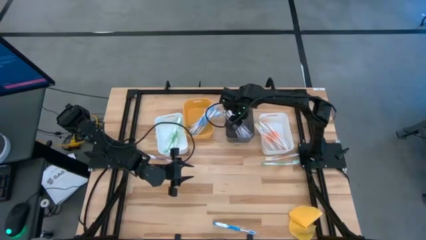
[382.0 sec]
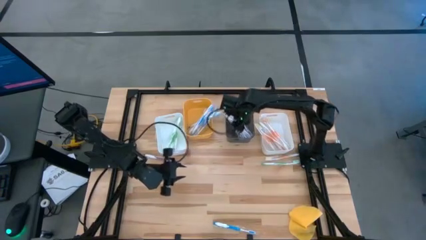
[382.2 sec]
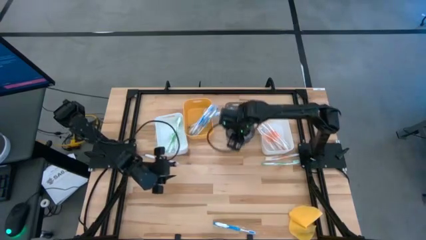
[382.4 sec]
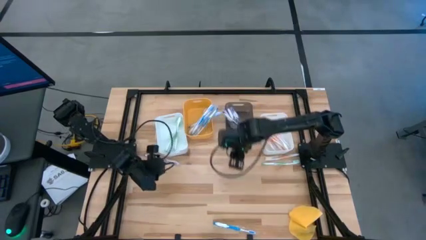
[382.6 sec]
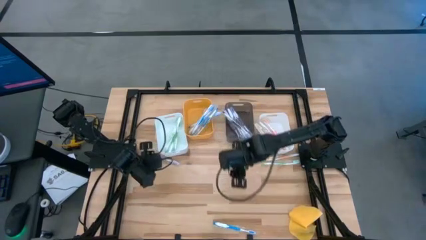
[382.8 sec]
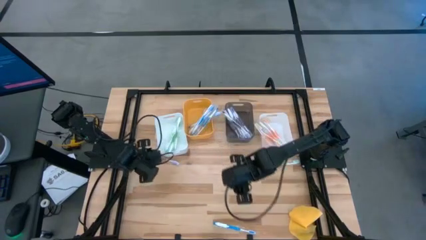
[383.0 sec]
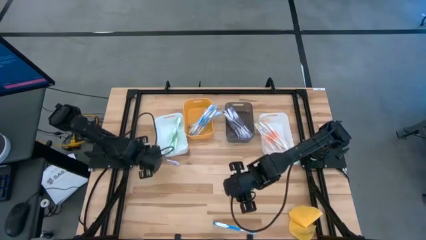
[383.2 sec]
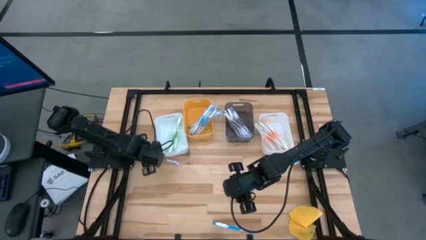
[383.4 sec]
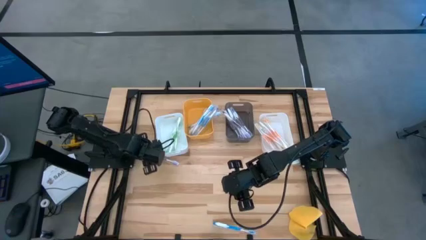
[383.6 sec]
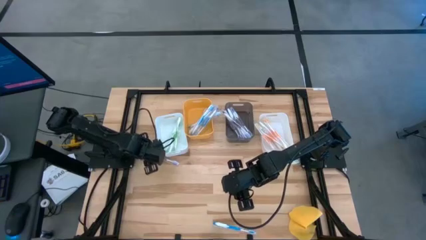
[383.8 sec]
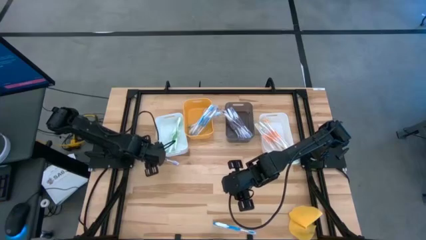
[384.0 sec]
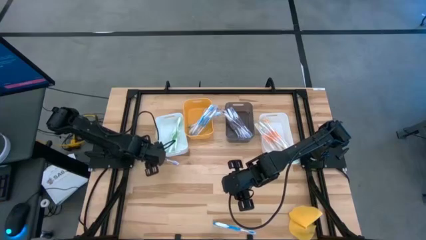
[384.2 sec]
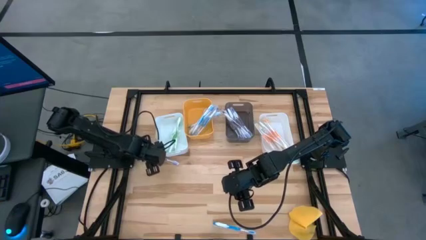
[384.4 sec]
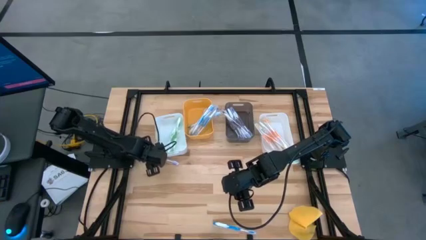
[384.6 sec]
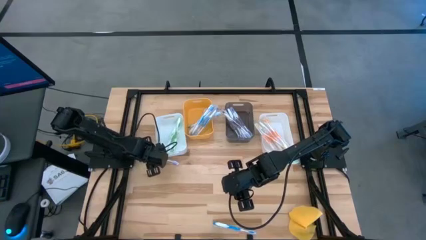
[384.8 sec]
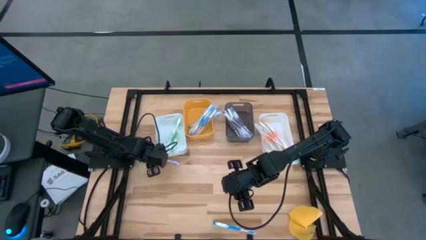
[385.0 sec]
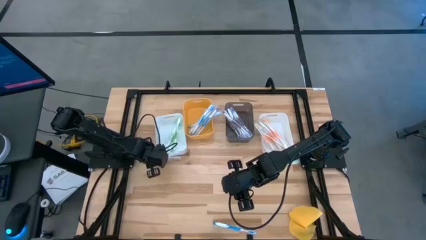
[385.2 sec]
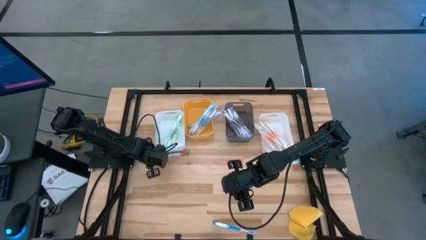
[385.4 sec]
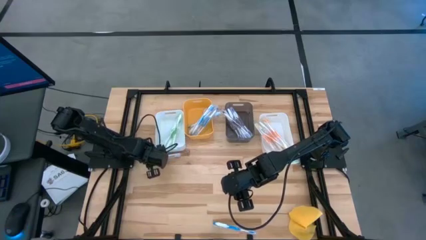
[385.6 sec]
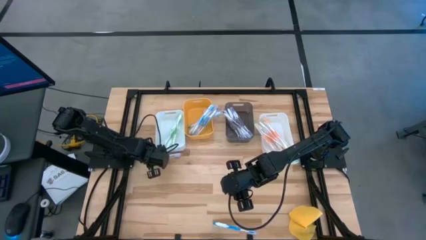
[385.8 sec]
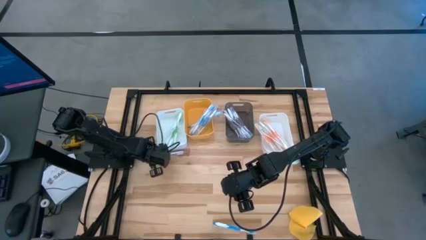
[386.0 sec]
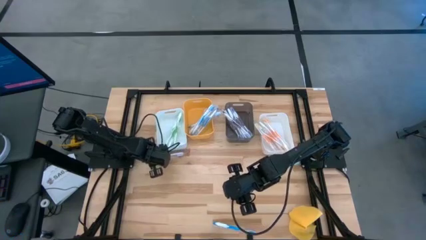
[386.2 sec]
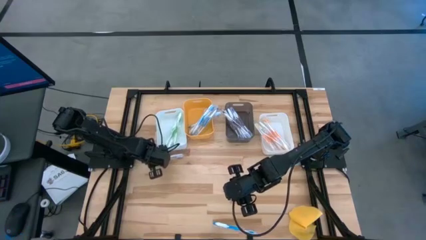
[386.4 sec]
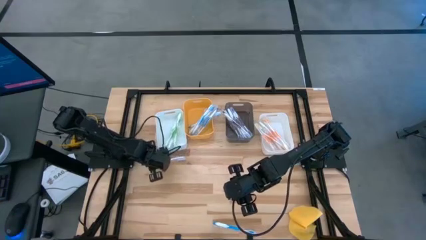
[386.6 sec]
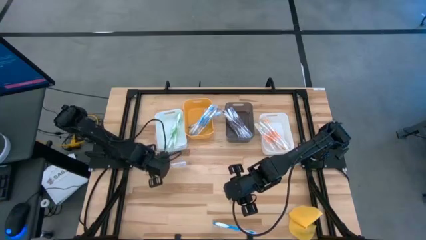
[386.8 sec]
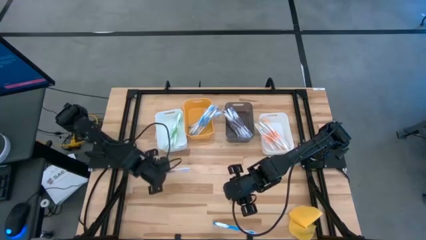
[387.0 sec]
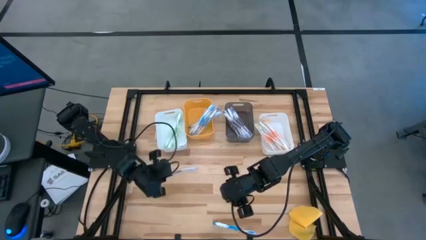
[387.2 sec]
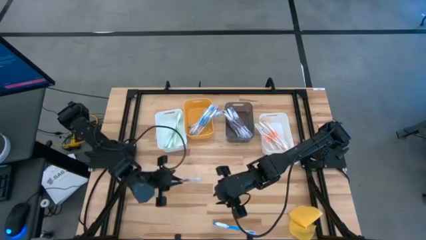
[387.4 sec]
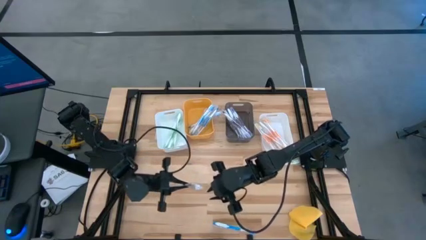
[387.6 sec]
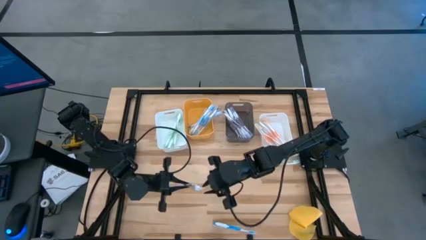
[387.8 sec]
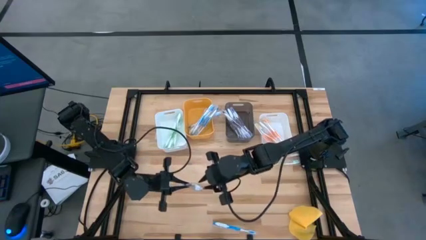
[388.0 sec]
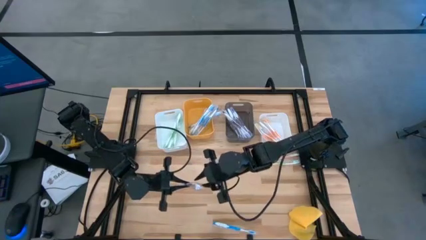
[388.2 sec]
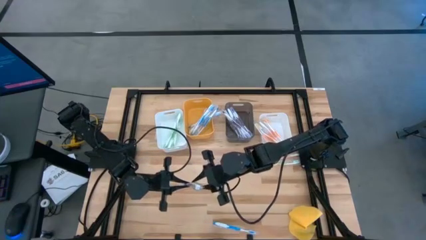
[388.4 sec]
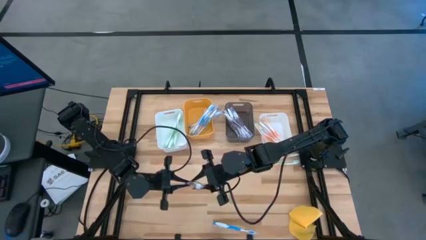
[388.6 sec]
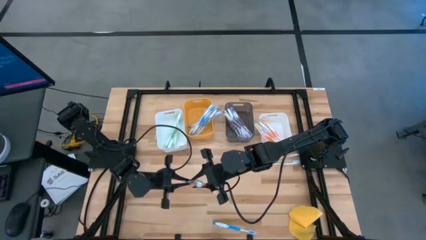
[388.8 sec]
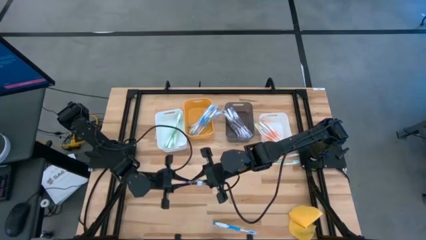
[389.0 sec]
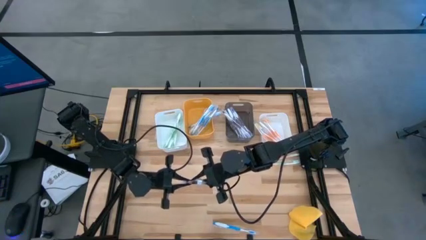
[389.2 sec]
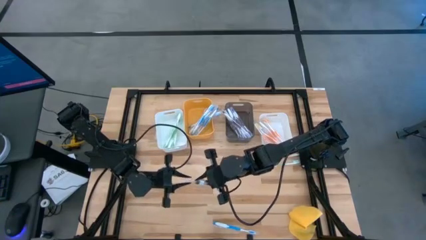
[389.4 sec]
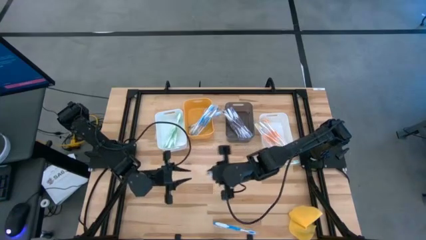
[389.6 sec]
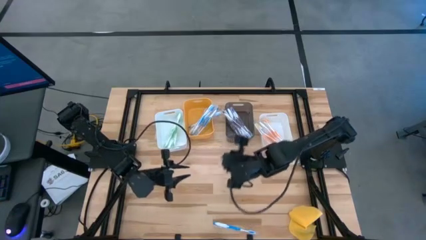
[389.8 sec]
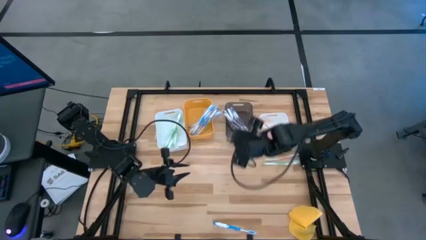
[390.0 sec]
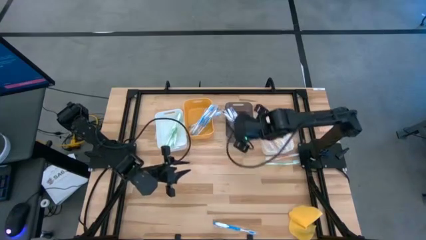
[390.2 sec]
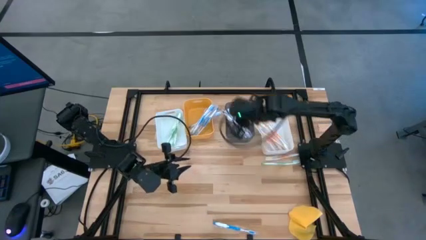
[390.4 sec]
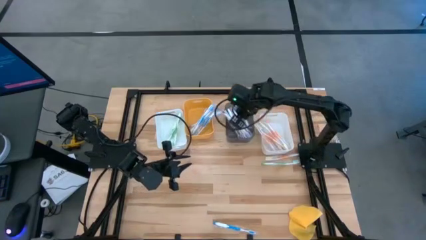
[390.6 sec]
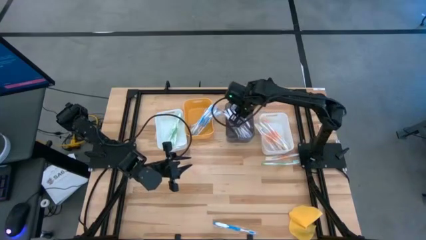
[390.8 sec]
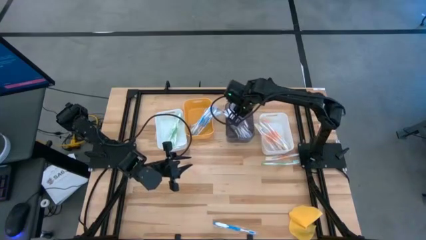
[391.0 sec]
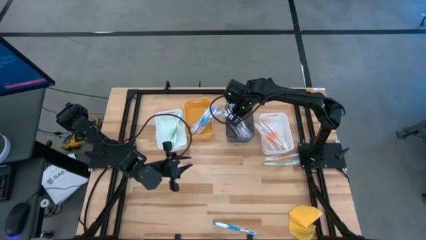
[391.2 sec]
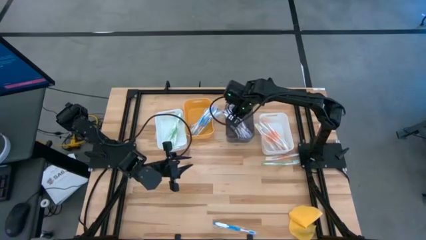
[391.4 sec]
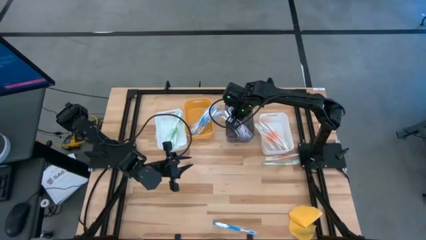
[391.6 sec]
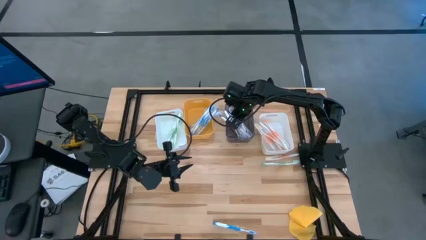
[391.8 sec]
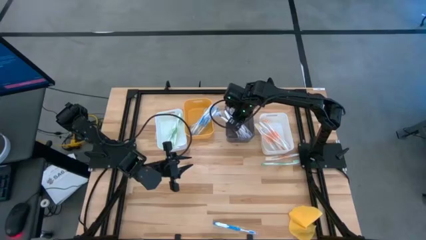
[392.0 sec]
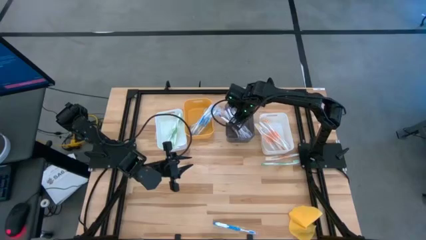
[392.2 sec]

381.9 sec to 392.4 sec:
Task: Pick & Place Toothbrushes
Put the purple toothbrush into the black transparent bin

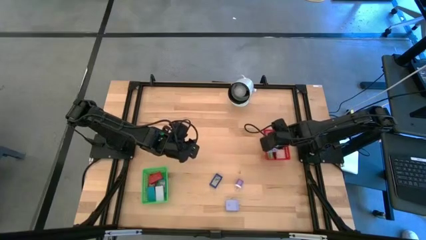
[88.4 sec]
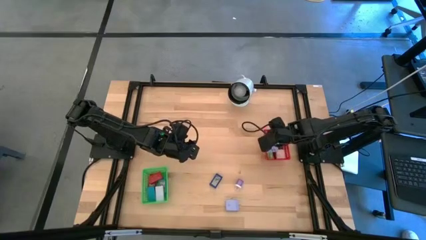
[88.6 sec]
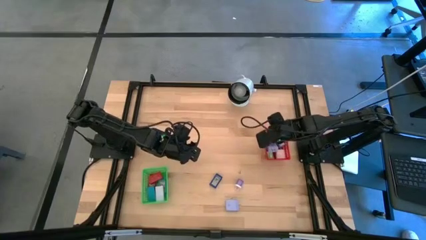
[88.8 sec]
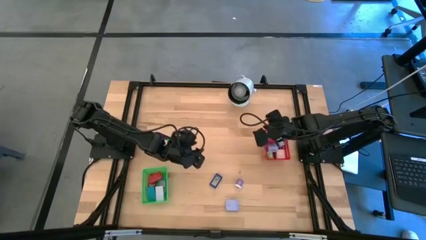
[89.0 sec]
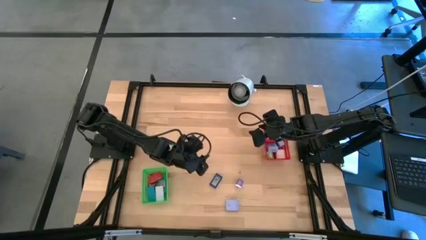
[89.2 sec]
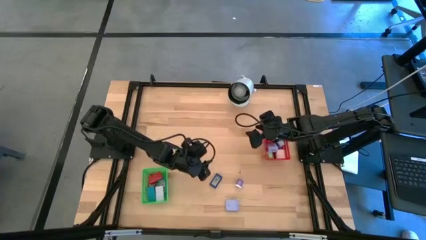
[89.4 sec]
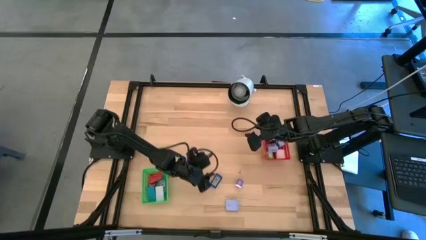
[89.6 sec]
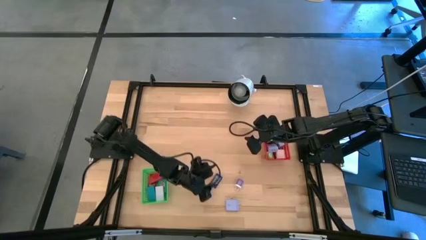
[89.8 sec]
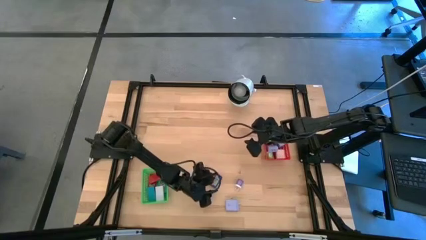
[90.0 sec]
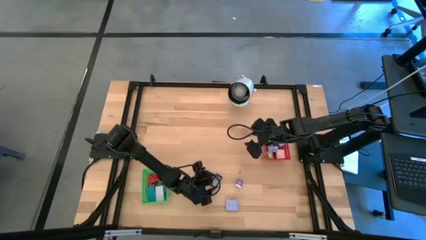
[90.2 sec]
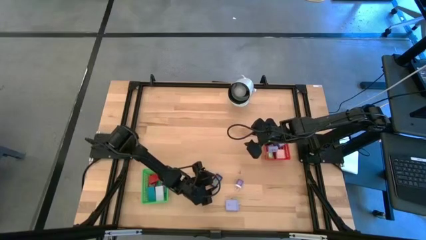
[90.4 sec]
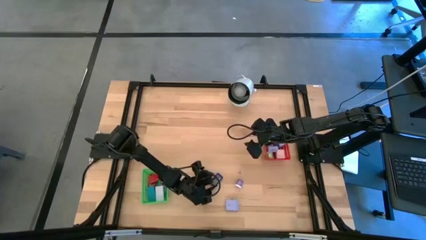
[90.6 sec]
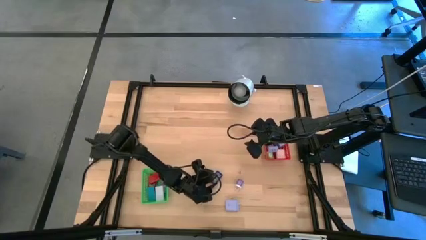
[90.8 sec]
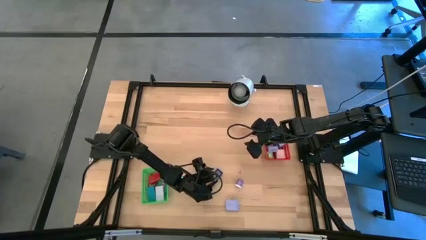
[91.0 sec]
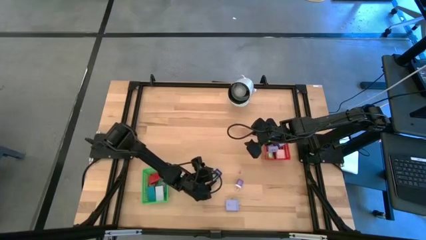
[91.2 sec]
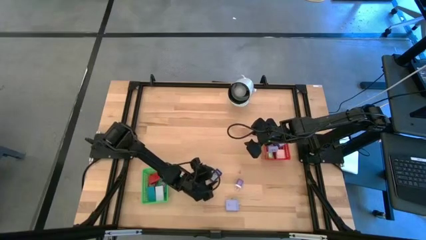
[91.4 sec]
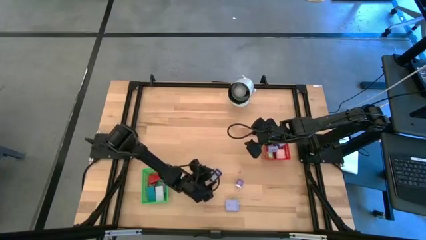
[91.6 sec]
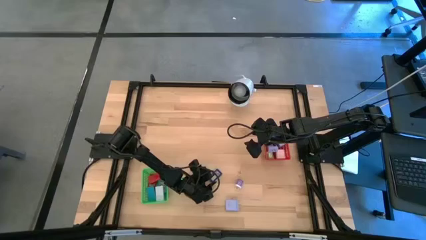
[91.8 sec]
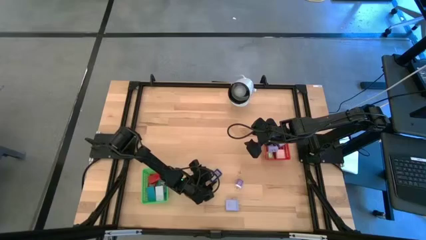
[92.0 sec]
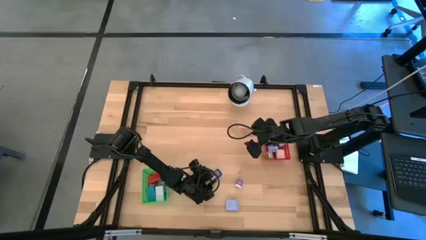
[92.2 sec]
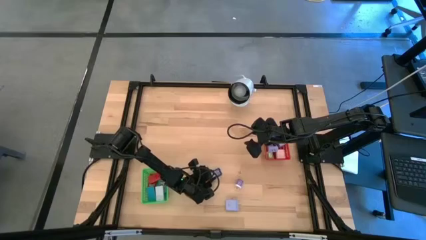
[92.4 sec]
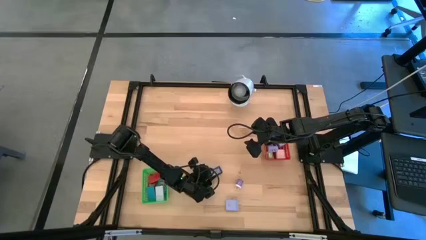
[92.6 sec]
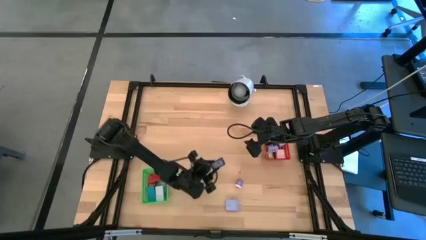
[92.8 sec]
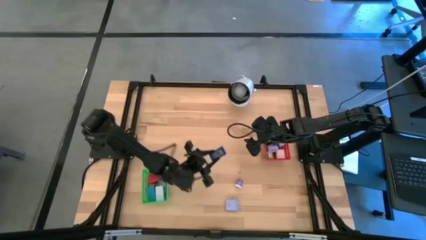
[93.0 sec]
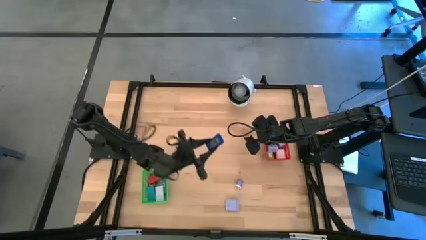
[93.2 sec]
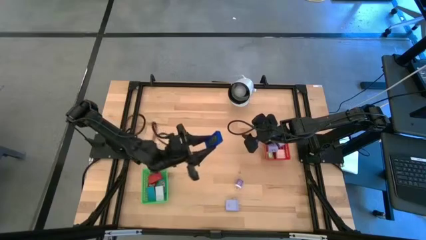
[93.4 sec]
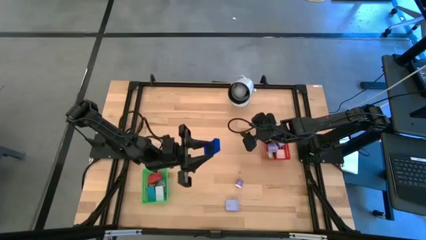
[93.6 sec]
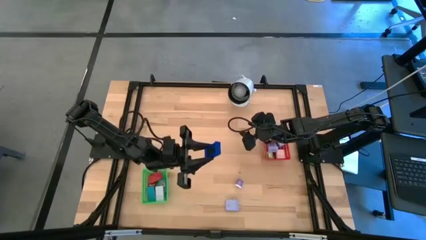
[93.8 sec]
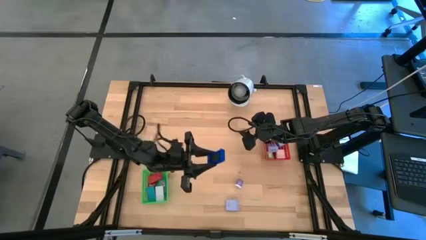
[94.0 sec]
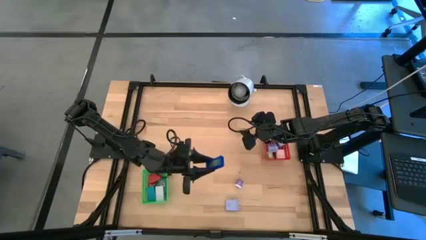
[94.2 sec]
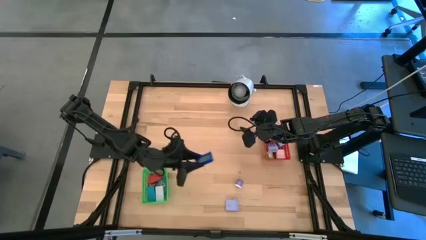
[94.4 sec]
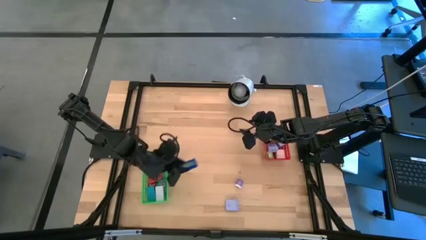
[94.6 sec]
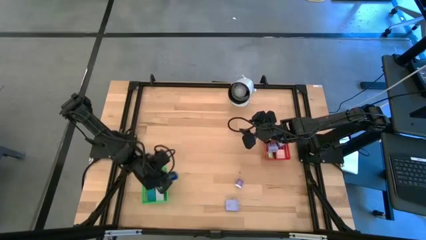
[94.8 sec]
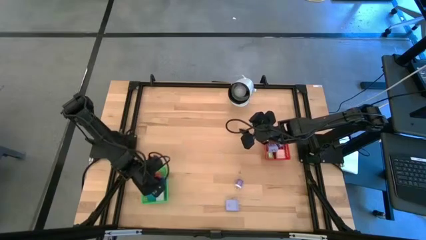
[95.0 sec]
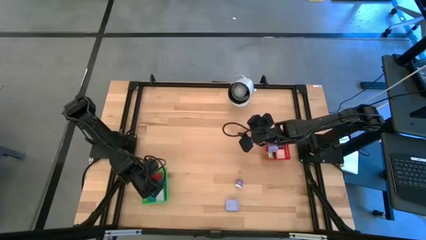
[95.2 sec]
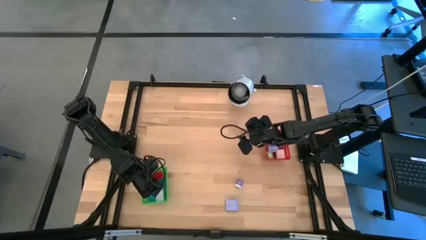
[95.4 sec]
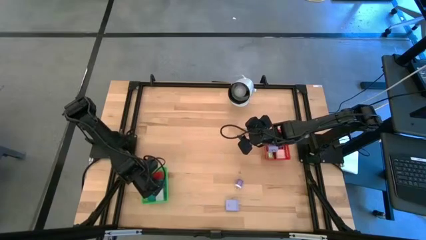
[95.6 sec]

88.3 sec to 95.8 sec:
Task: Pick & Place Office items
Put the blue digital clock into the green bin
